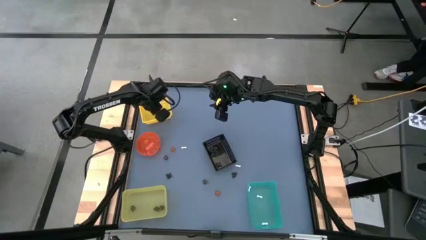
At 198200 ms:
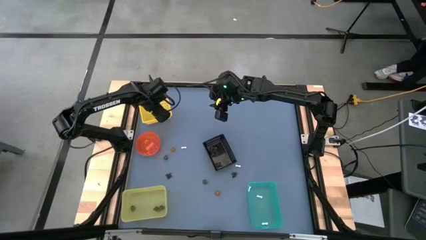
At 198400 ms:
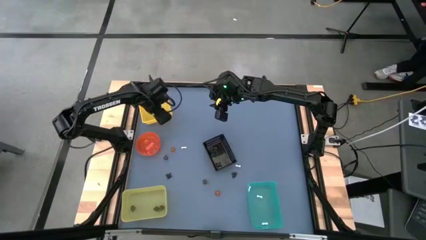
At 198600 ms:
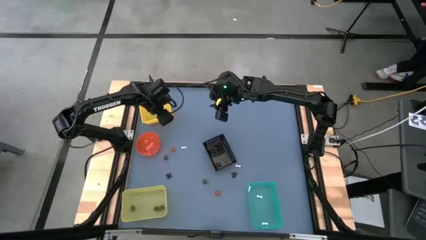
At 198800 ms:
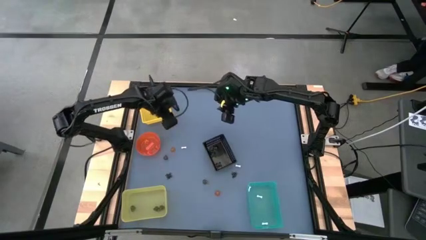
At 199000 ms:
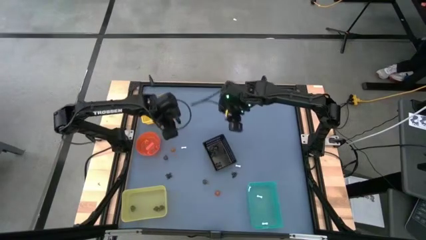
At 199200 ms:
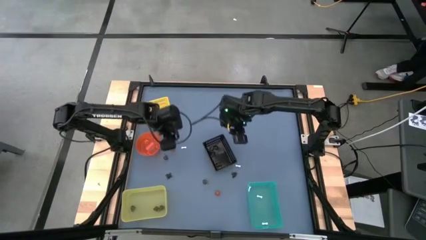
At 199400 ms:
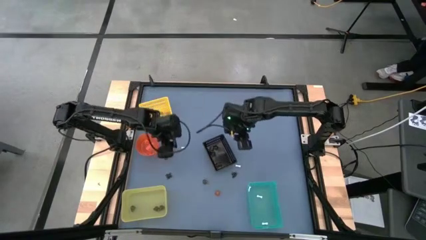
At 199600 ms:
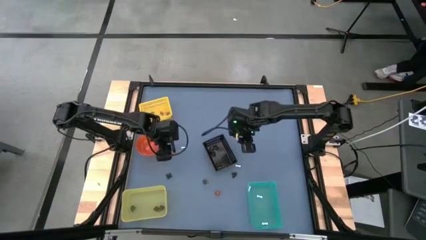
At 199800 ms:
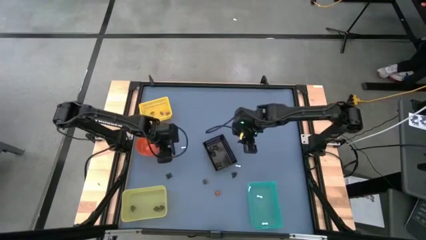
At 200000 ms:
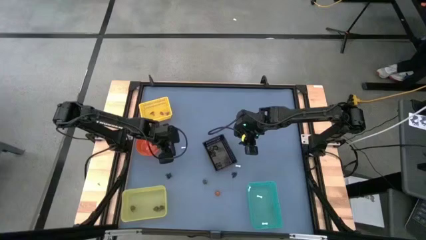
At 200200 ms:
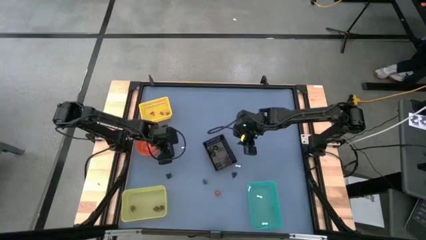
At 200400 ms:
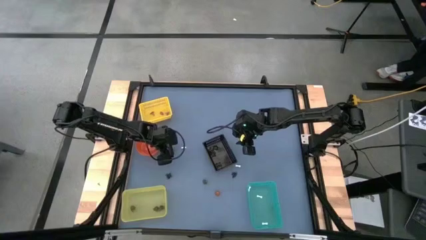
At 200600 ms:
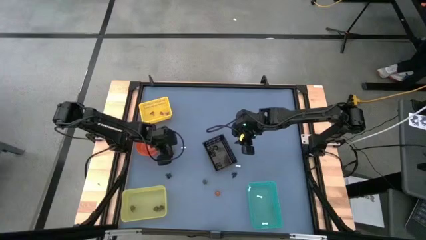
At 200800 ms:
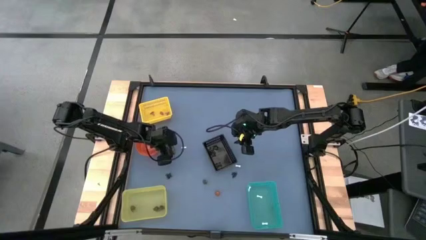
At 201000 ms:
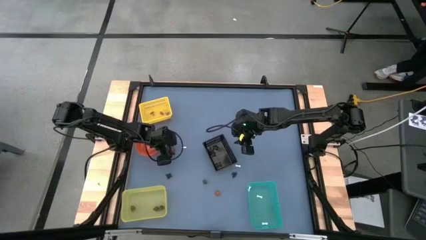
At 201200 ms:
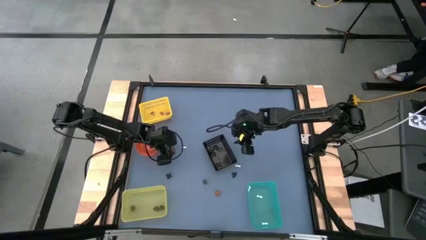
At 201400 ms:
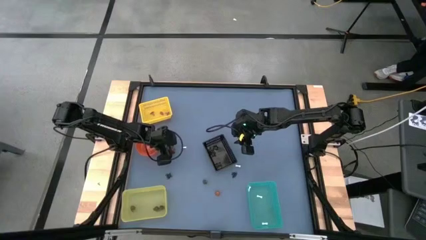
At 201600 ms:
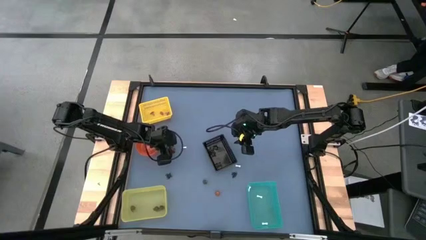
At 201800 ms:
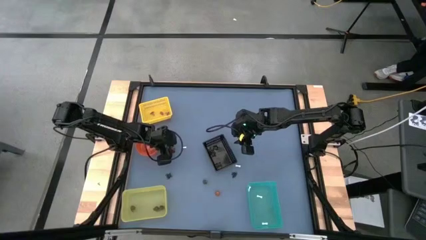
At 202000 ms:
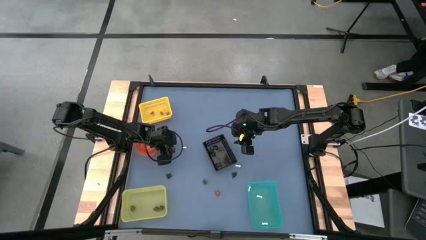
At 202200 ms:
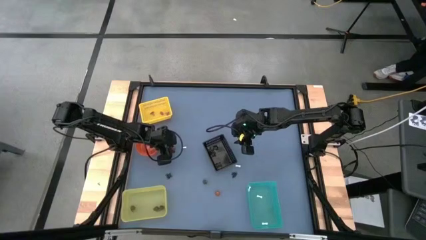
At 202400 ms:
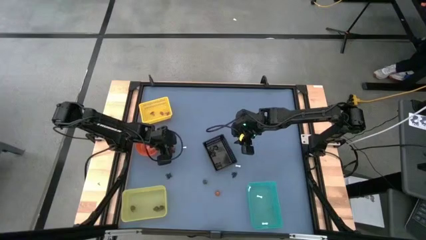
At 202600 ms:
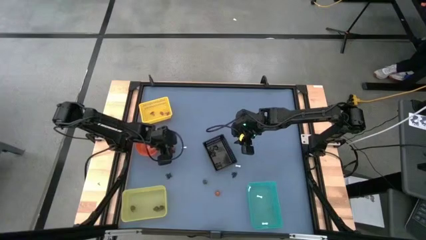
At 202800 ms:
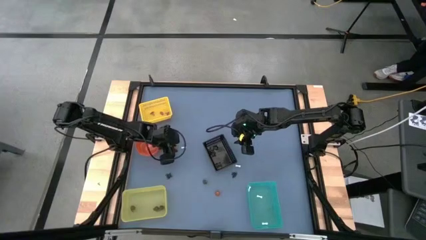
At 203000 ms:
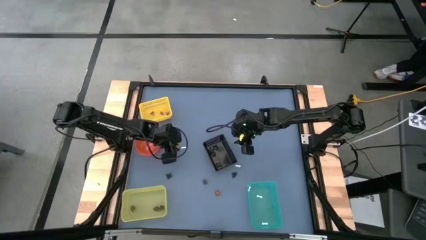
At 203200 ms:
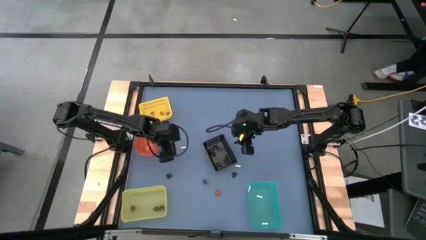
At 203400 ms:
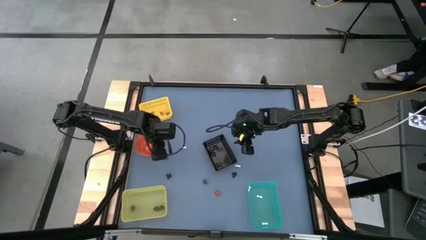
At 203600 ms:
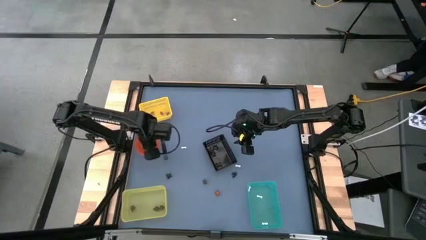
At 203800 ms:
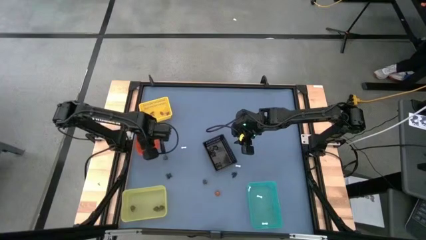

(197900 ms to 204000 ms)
Task: Sort Halloween decoration
Put the orange pumpkin toy into the orange bin

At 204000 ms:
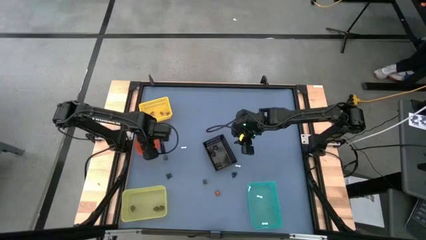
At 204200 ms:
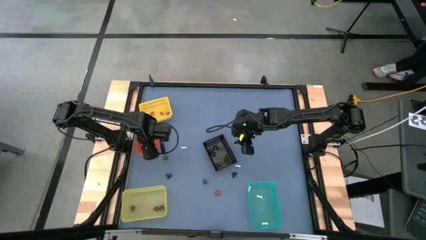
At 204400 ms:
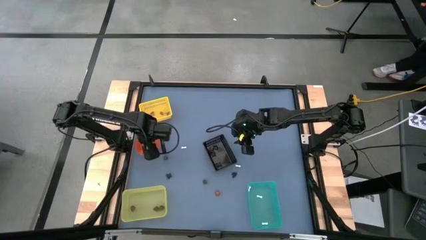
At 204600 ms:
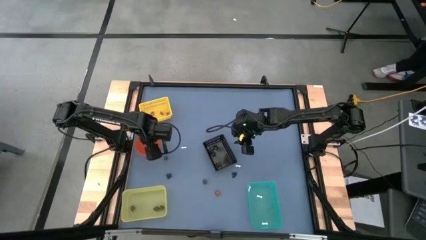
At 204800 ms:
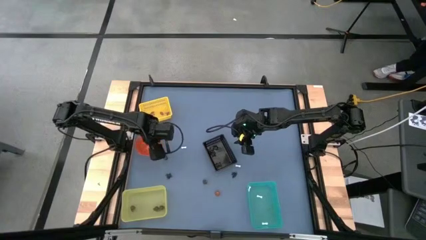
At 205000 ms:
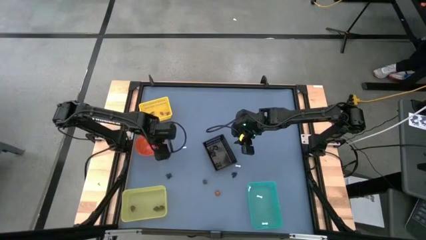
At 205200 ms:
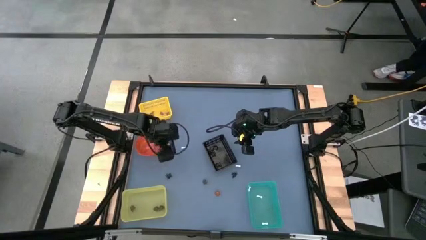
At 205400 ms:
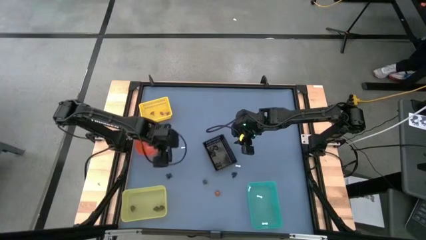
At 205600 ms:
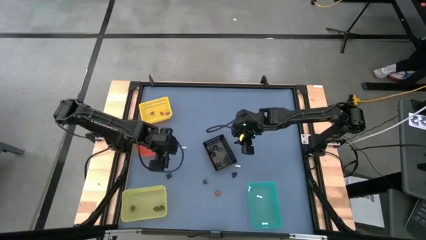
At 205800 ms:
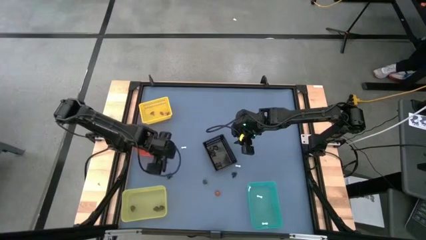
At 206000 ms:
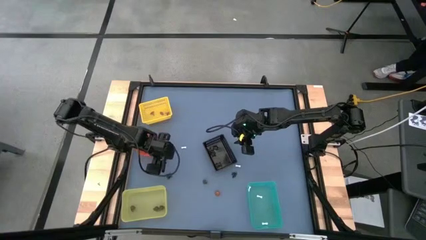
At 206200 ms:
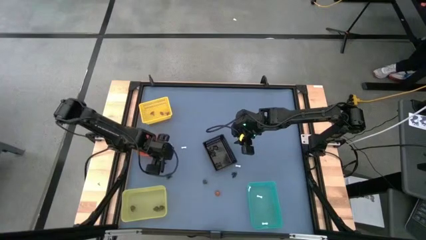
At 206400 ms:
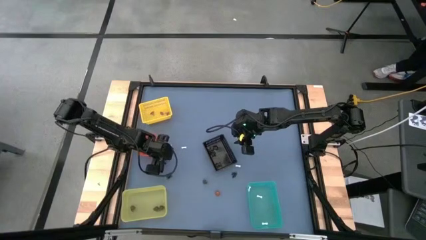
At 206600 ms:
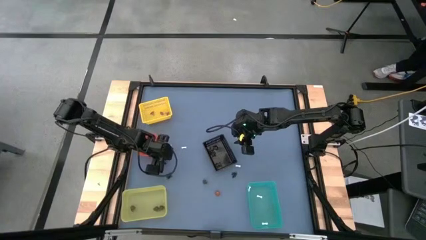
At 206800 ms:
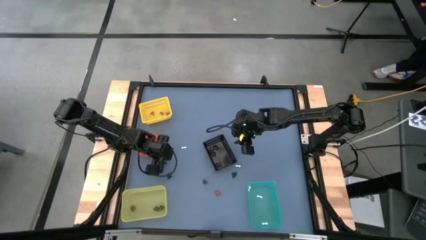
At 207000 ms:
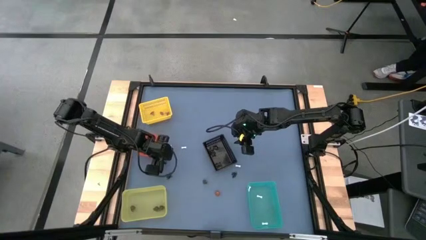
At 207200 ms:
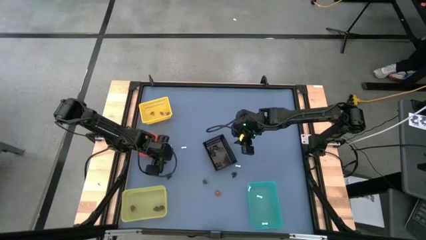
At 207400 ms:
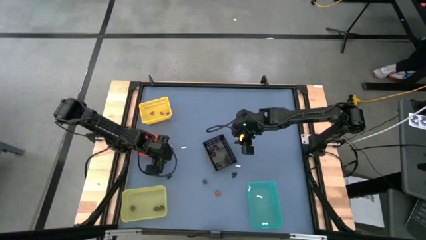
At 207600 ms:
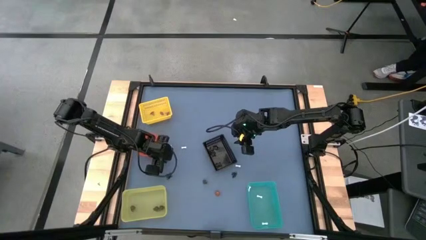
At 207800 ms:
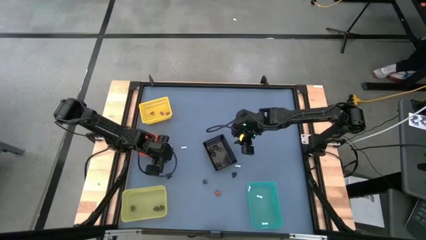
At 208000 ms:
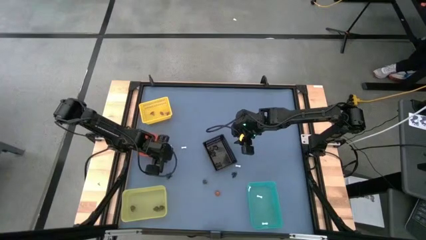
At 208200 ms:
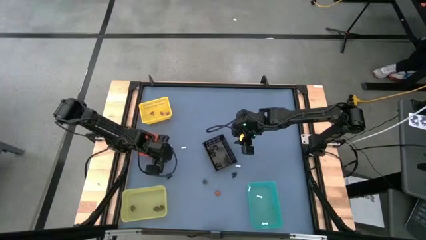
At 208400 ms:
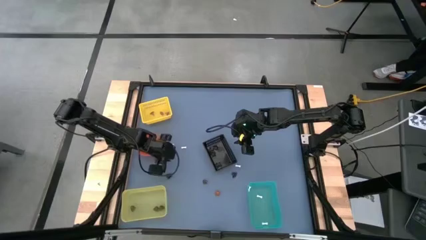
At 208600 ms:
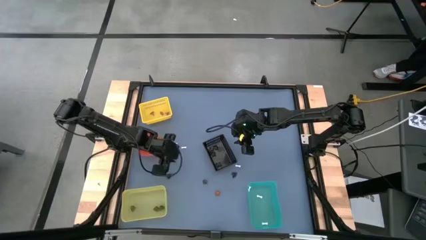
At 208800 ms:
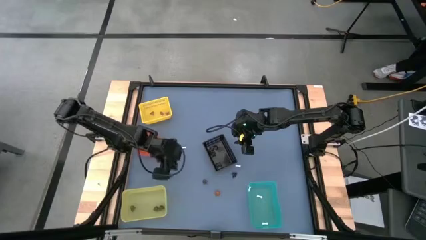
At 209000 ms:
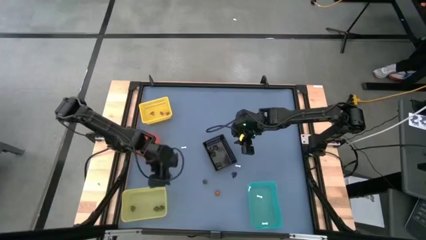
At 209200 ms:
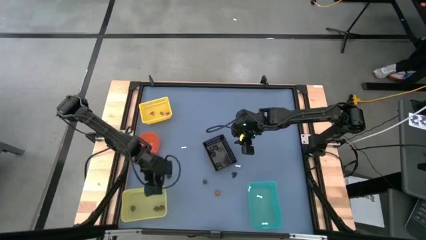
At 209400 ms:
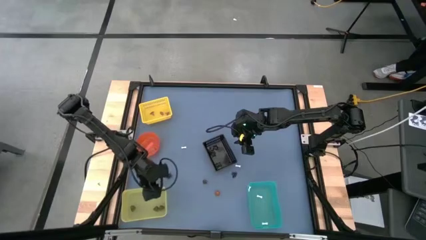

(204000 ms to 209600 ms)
Put the black skull toy into the bottom yellow bin

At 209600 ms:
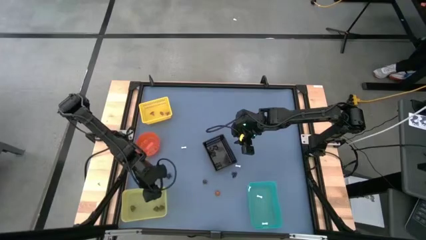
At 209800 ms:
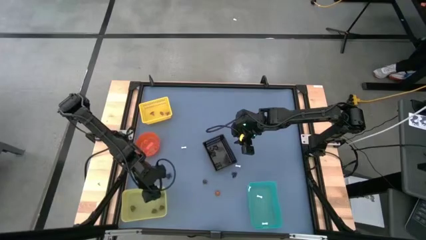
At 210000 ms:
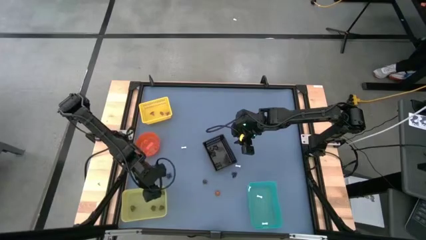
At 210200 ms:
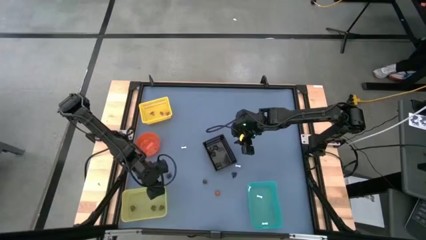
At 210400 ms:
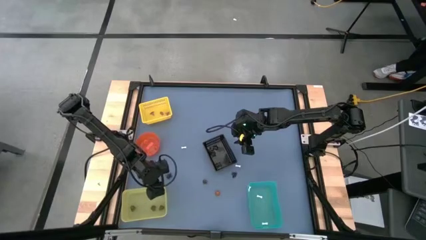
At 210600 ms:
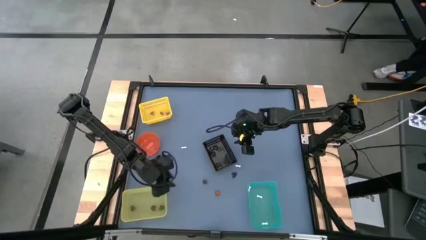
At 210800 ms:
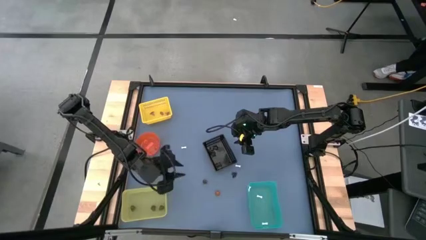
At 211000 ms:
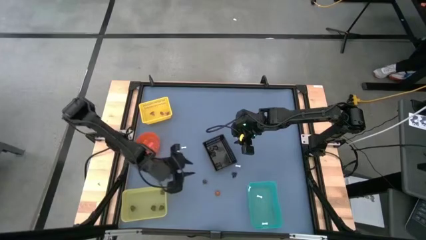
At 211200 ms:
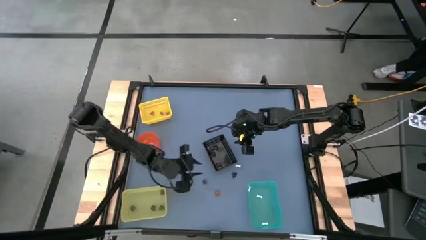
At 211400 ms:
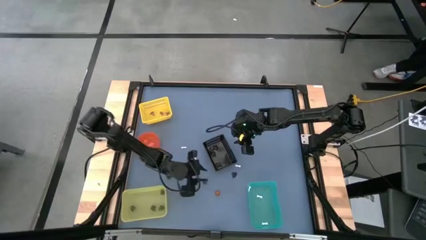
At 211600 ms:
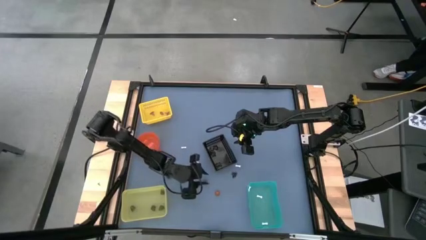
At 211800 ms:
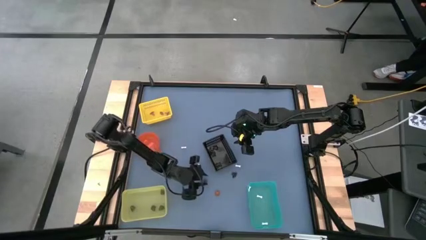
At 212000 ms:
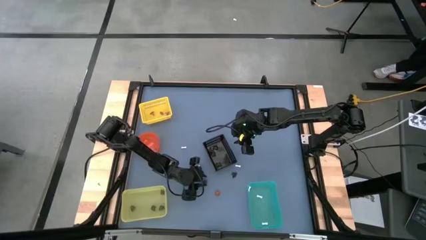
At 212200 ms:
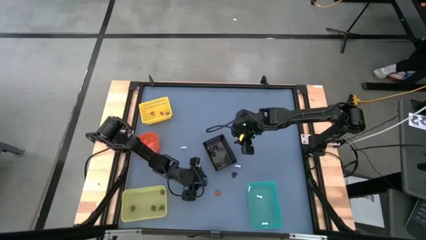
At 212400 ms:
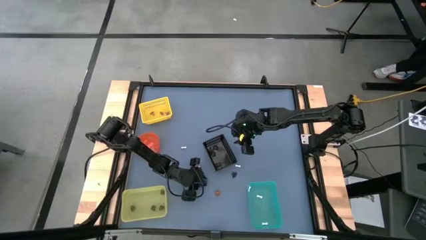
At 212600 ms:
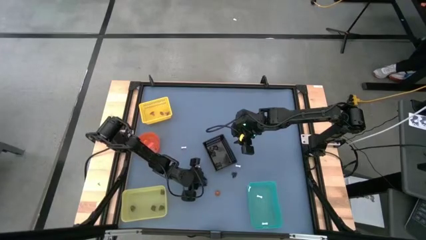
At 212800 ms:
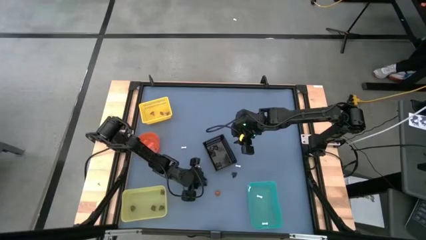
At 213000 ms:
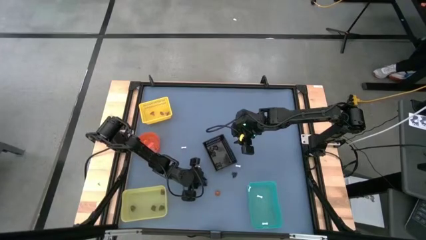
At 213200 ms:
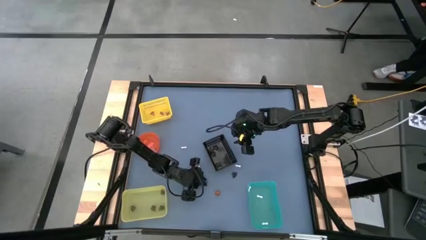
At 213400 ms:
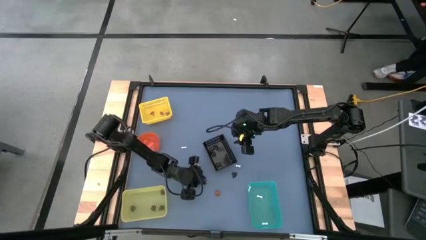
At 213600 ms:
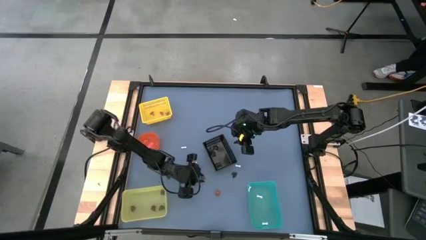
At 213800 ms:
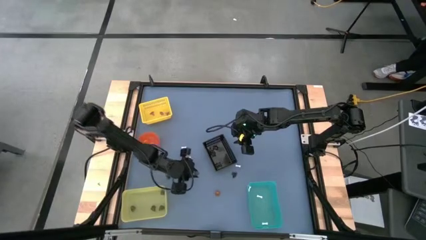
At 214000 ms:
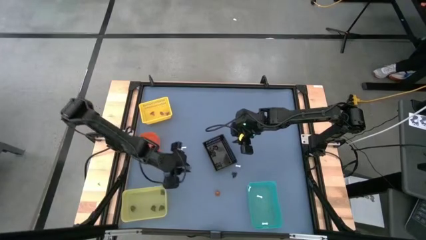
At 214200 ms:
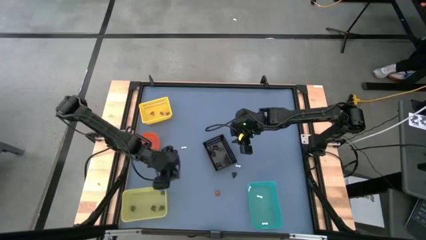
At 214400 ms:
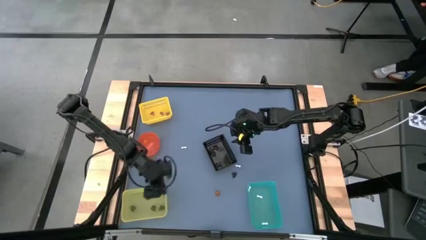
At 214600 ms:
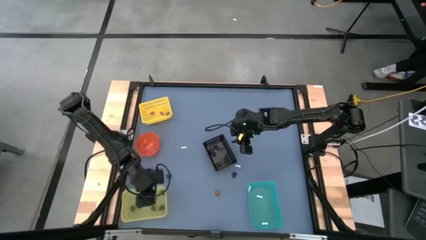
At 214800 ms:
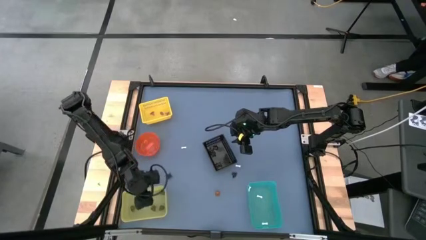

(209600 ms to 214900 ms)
Put the black skull toy into the bottom yellow bin
